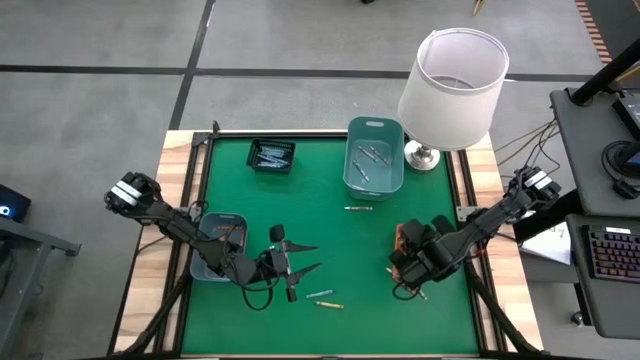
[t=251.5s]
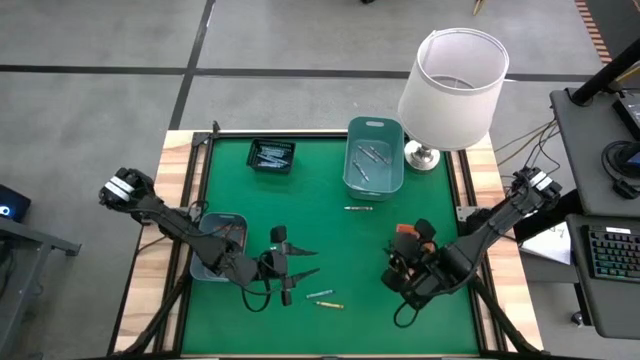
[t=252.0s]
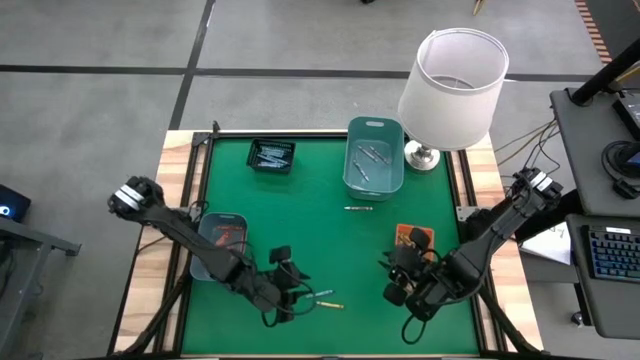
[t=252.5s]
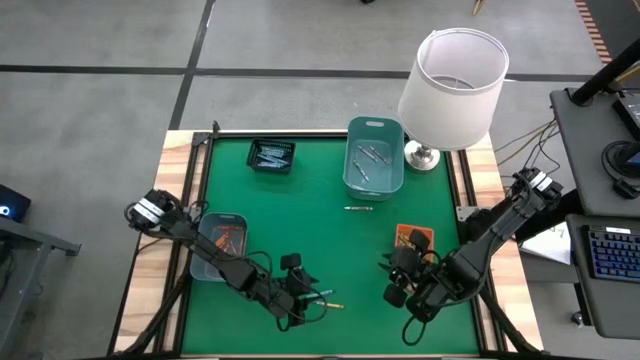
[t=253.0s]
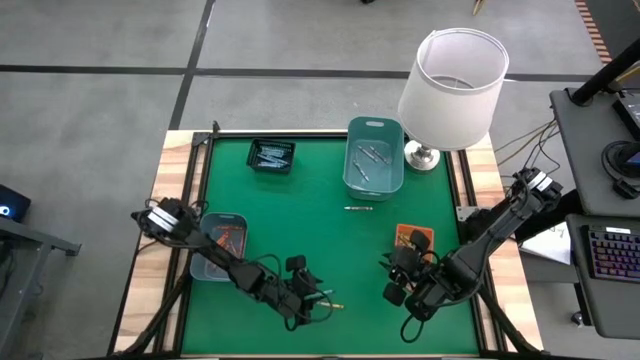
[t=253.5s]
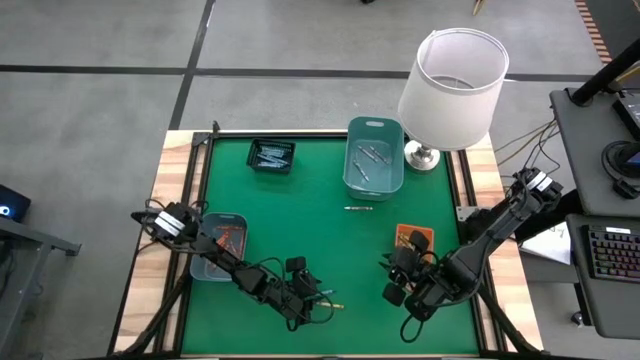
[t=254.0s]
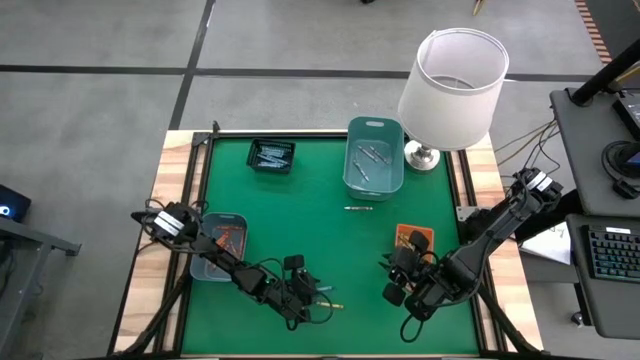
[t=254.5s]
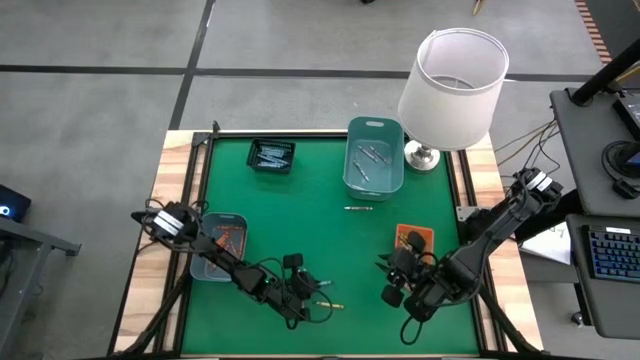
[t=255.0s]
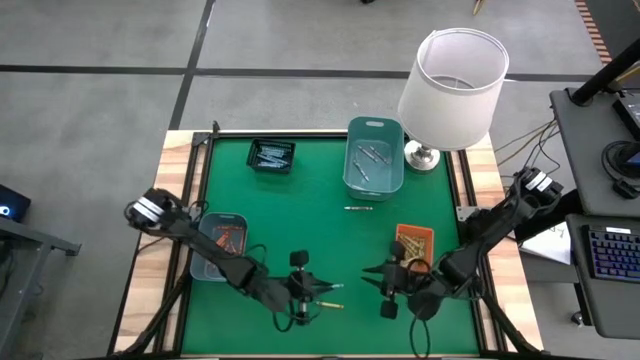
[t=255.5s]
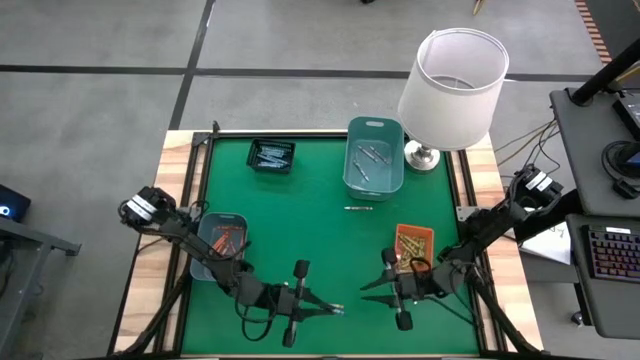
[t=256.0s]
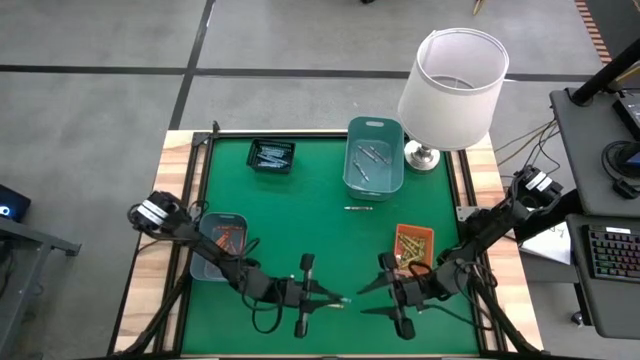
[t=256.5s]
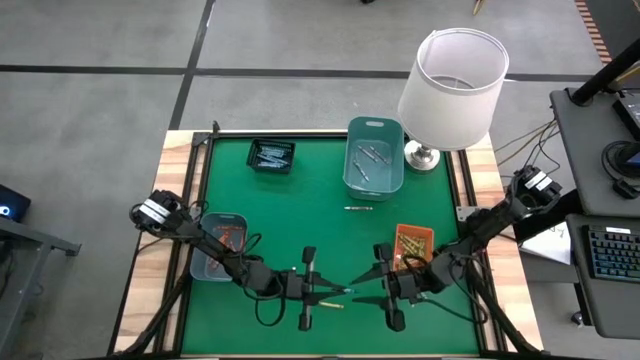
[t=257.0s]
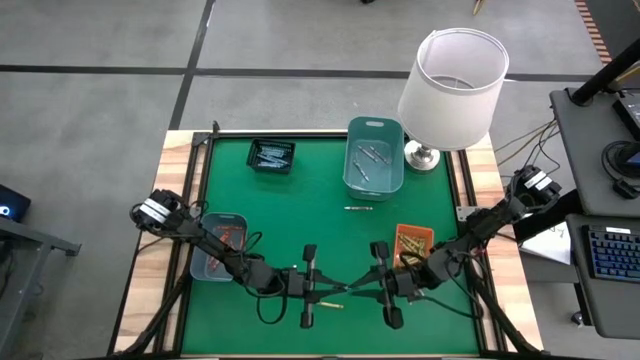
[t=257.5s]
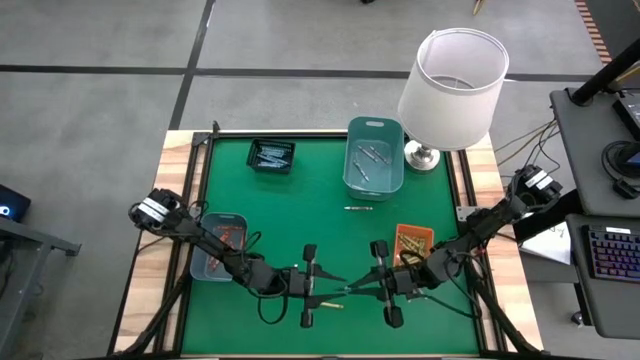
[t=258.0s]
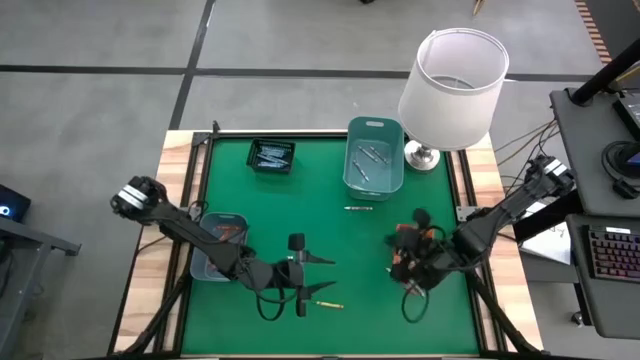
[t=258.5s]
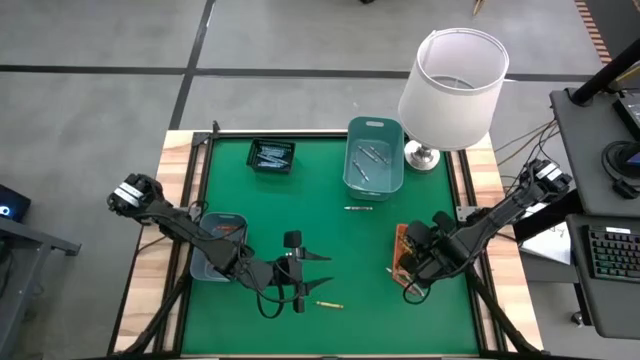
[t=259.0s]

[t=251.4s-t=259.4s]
Task: Sort crayons
Put the blue crayon into the black bin

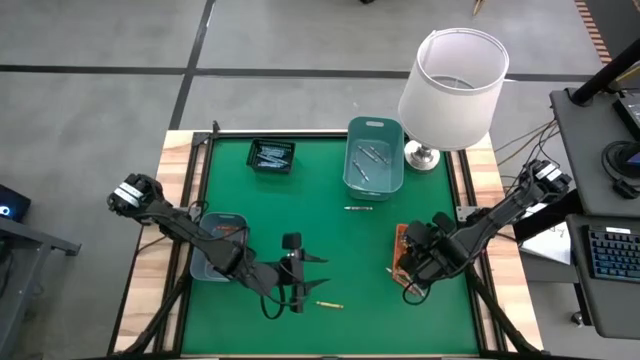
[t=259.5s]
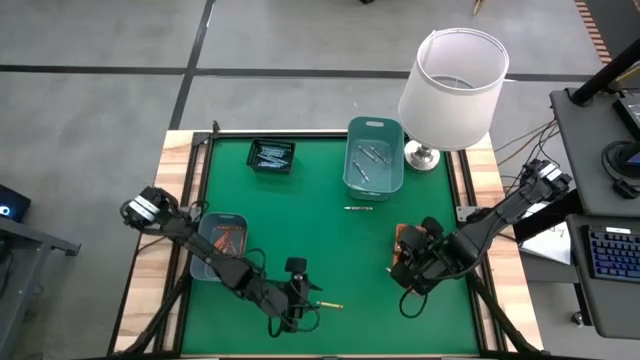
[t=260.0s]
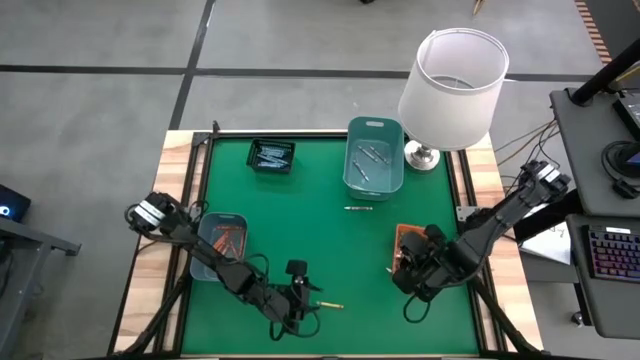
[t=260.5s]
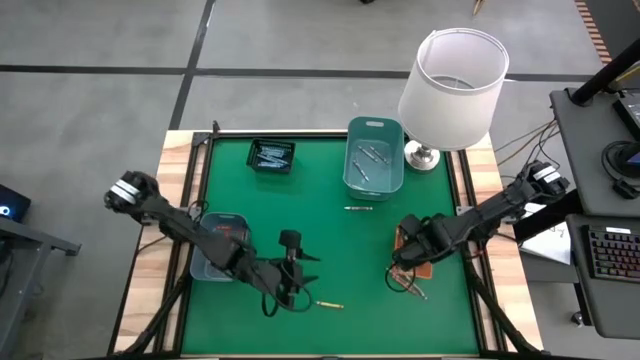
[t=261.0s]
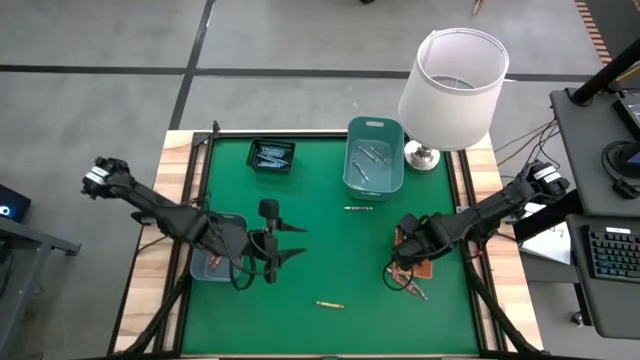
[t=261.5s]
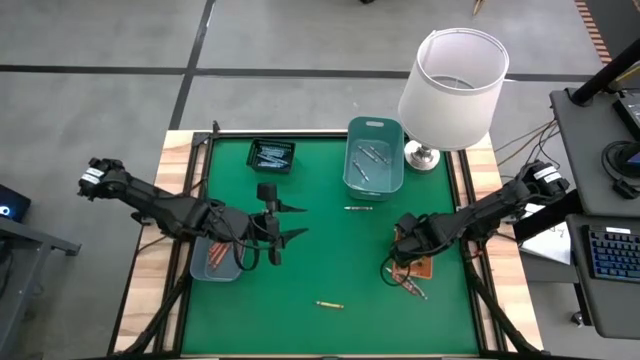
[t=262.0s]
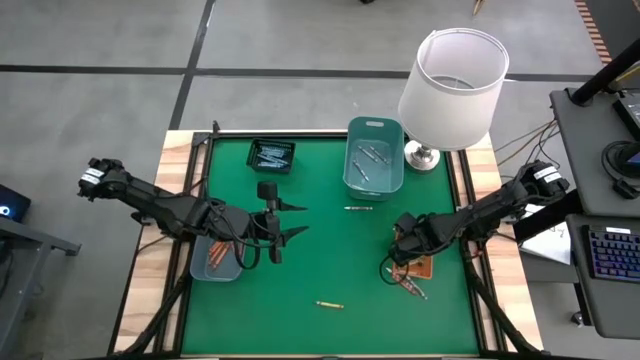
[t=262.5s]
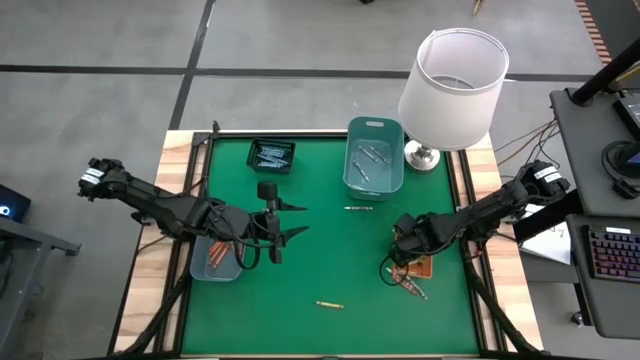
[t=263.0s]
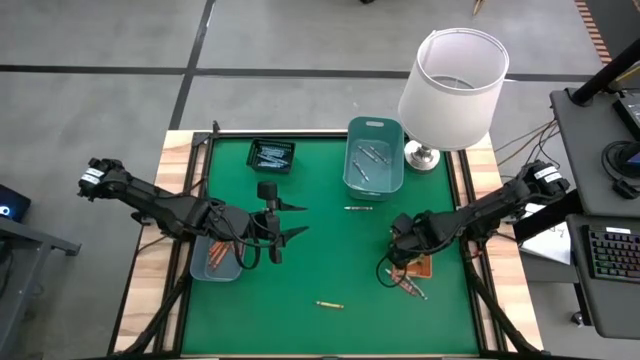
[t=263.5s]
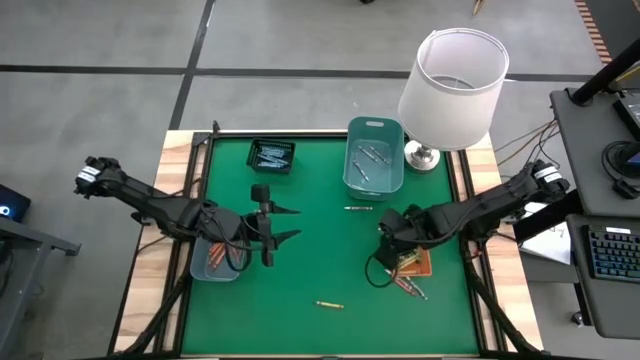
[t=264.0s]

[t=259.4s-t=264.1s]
Remove the blue crayon from the orange bin

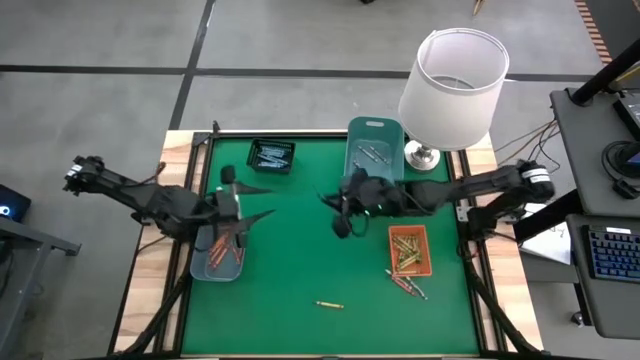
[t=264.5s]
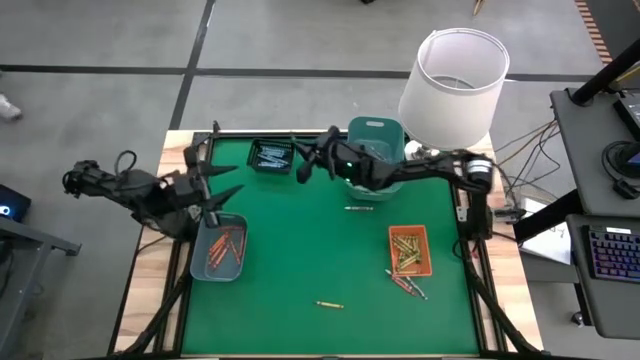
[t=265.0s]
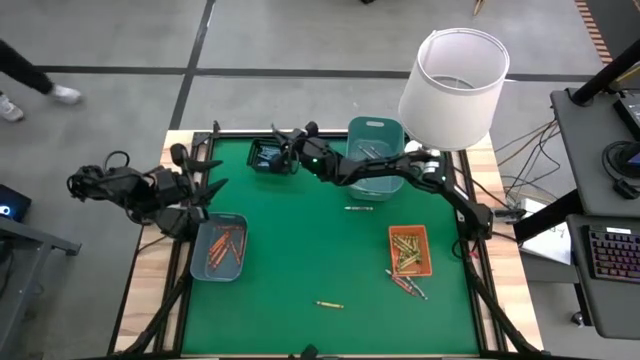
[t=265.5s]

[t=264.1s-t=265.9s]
Put the blue crayon into the black bin

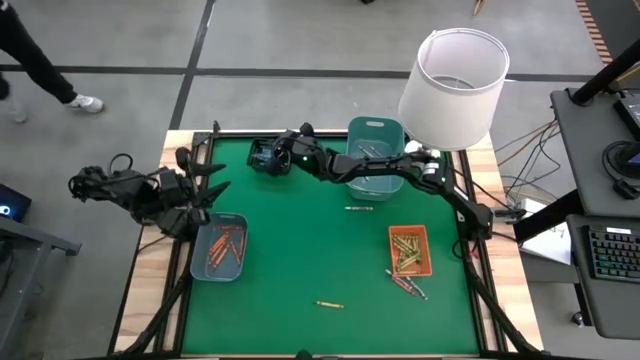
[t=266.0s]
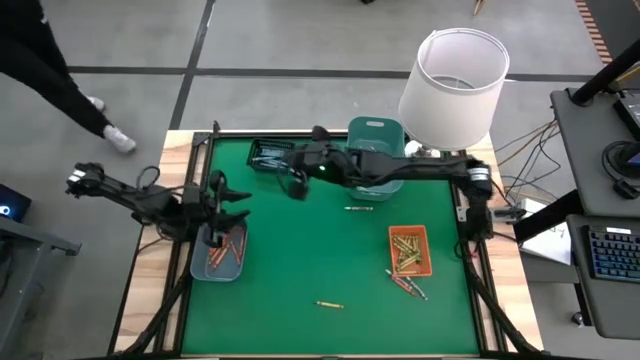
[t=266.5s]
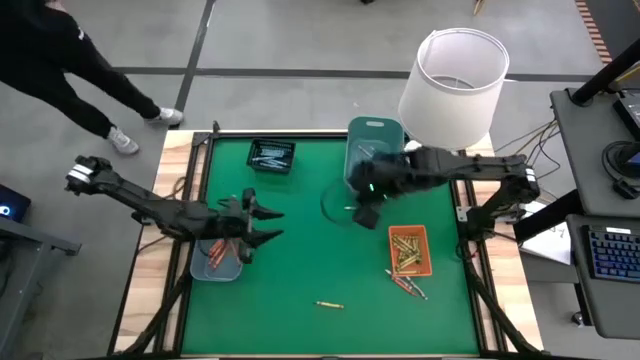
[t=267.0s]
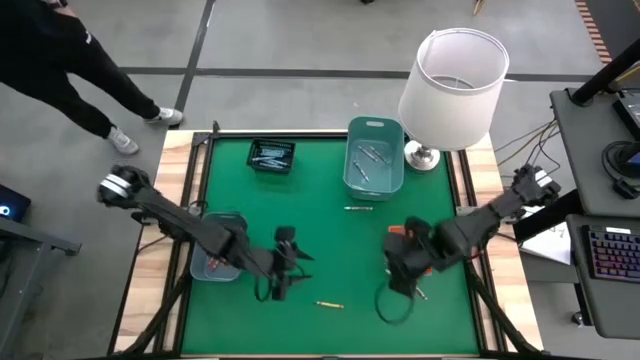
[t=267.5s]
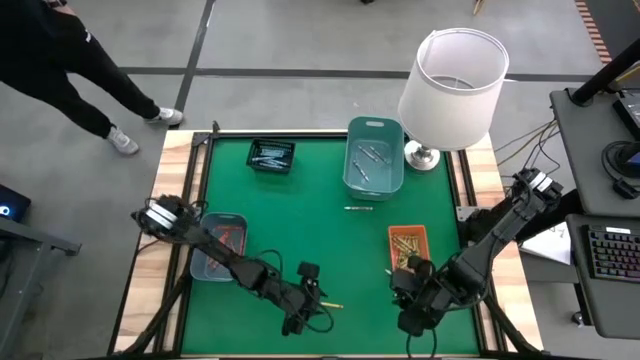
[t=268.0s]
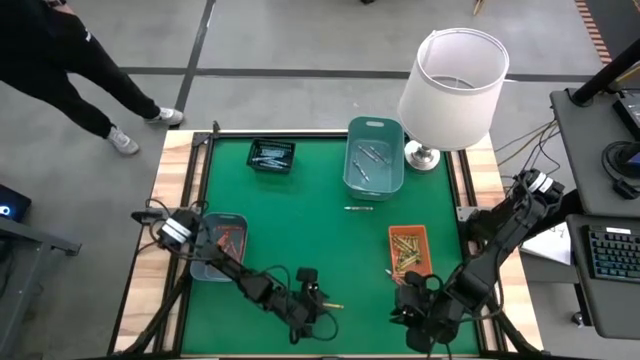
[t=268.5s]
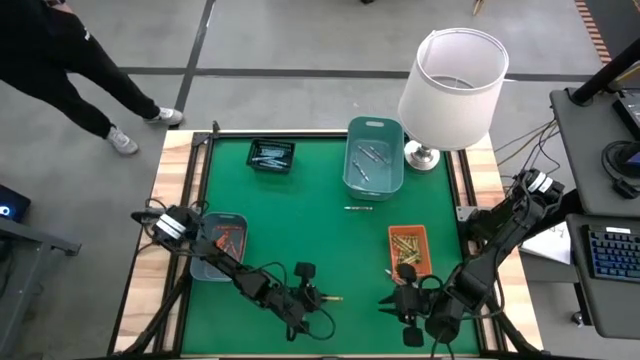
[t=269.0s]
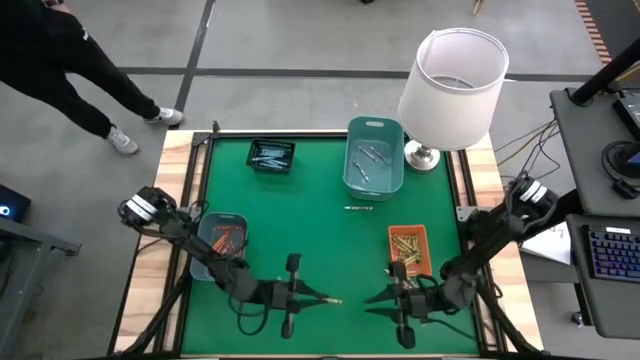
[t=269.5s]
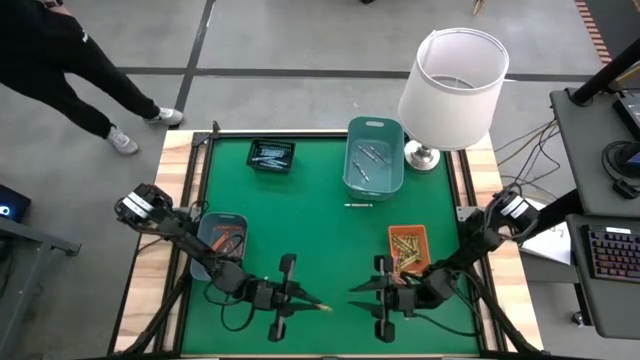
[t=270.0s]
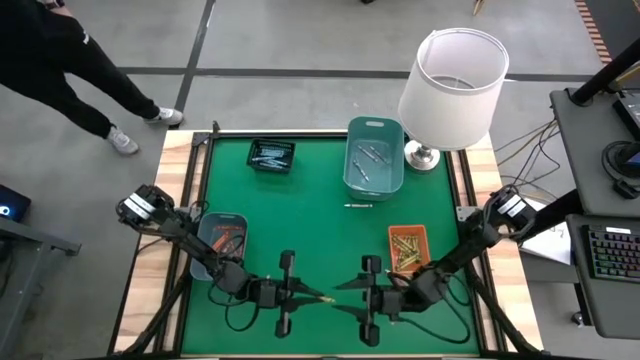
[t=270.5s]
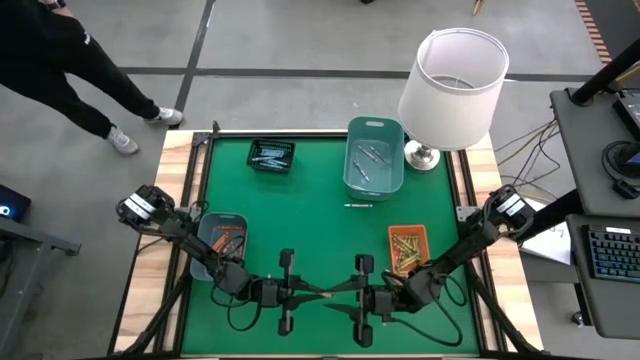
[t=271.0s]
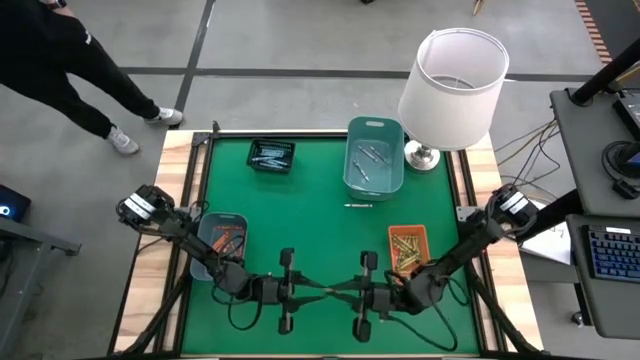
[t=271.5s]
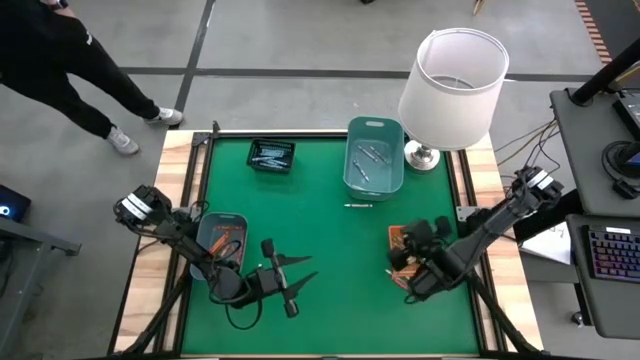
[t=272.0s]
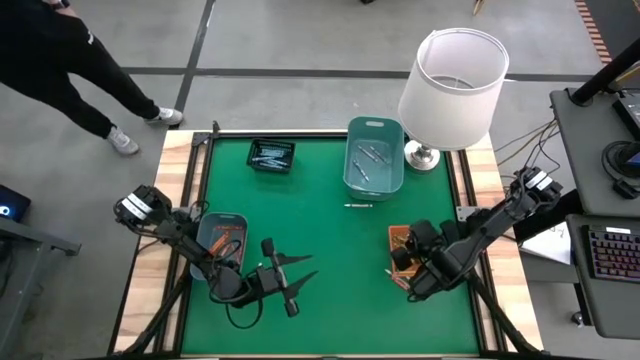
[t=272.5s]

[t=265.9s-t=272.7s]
Put the green crayon into the orange bin
